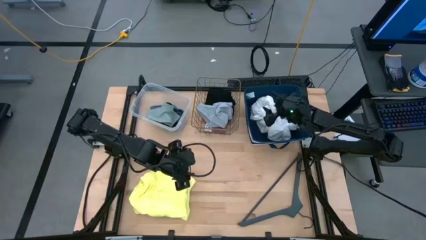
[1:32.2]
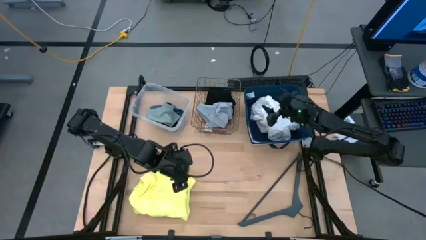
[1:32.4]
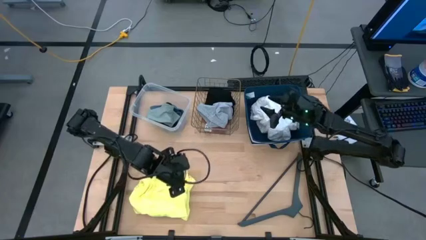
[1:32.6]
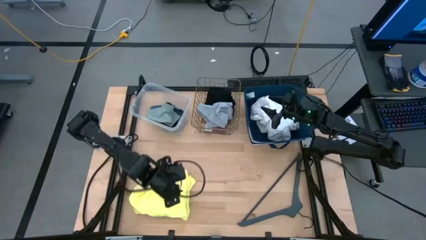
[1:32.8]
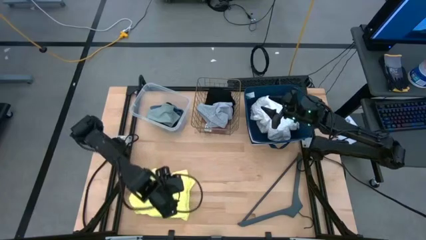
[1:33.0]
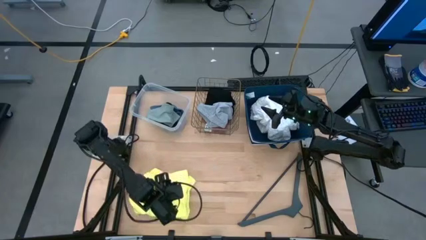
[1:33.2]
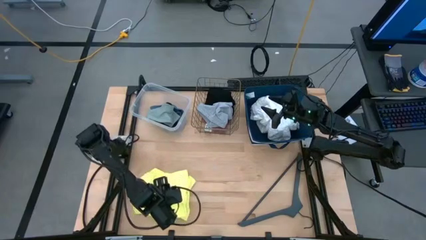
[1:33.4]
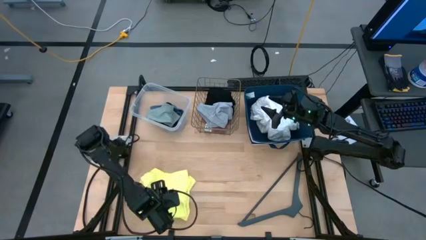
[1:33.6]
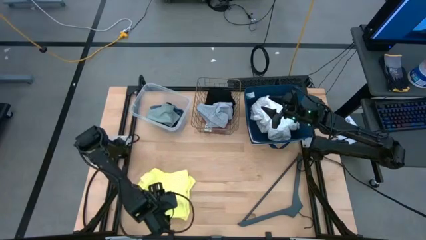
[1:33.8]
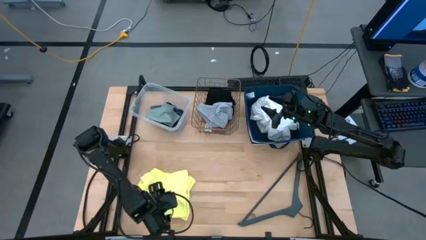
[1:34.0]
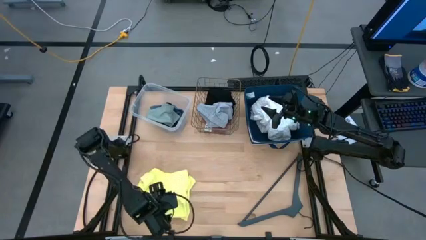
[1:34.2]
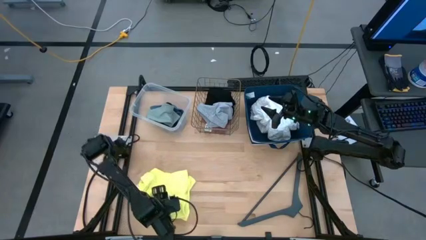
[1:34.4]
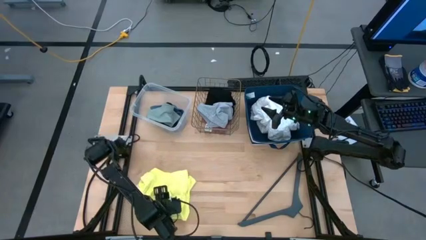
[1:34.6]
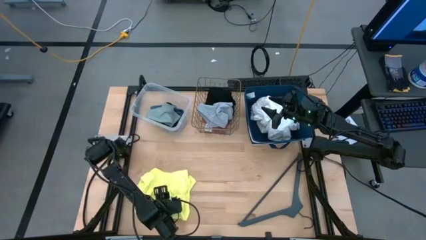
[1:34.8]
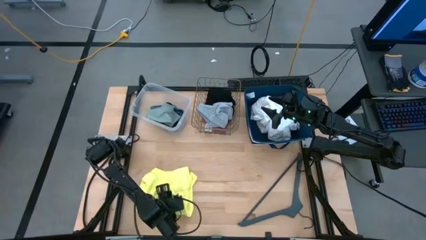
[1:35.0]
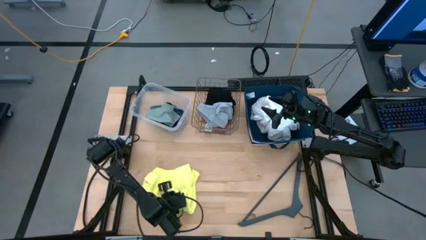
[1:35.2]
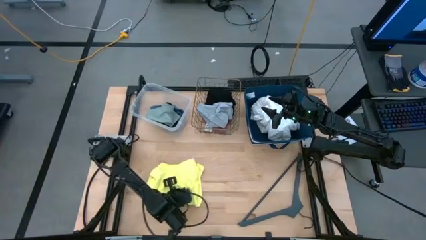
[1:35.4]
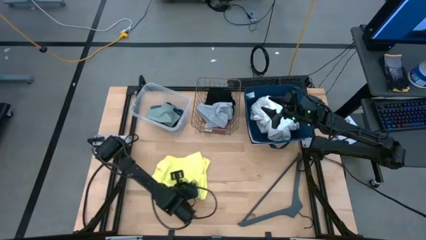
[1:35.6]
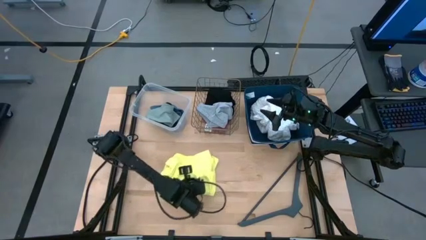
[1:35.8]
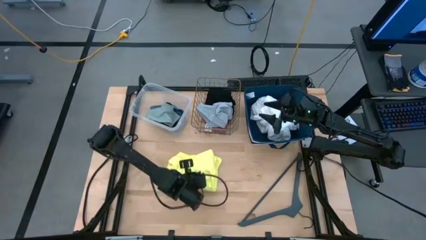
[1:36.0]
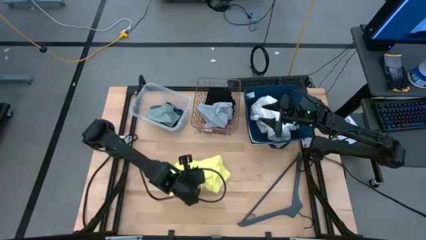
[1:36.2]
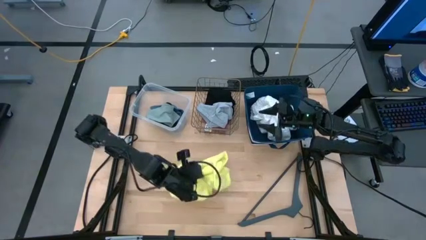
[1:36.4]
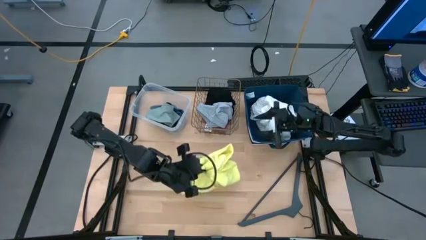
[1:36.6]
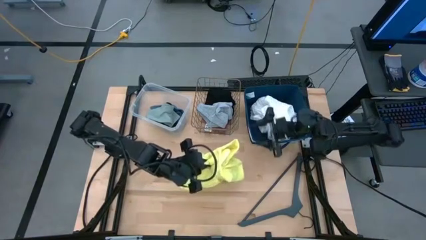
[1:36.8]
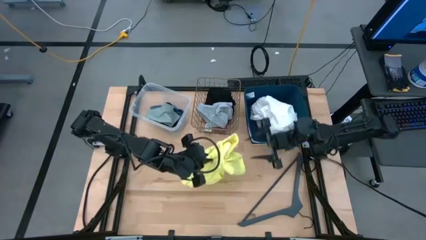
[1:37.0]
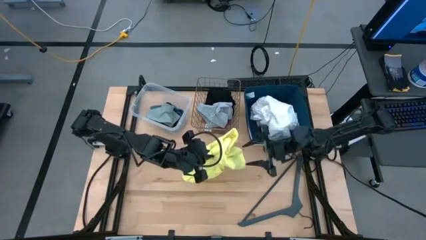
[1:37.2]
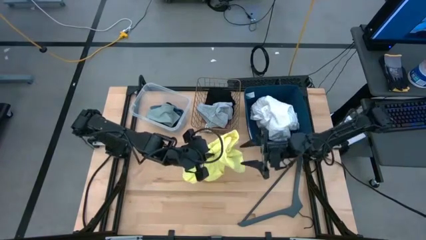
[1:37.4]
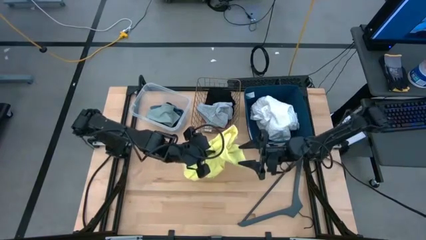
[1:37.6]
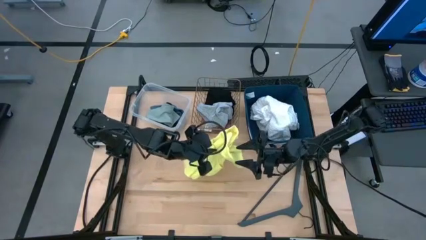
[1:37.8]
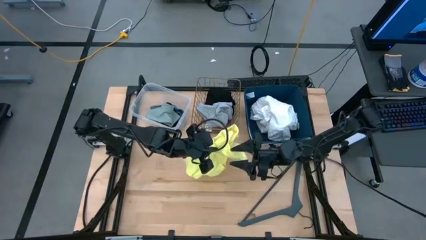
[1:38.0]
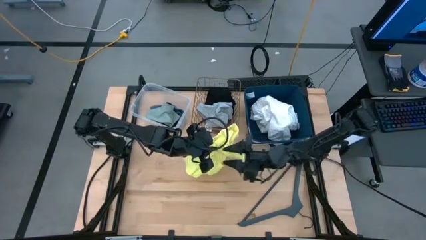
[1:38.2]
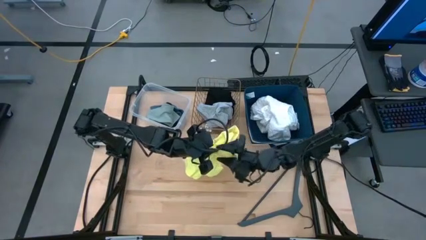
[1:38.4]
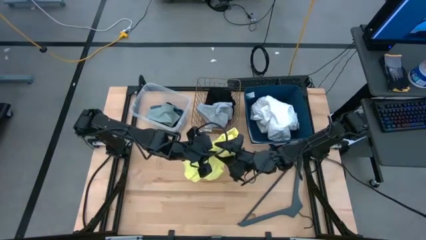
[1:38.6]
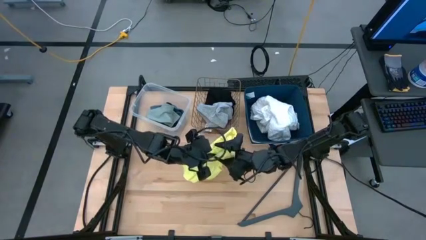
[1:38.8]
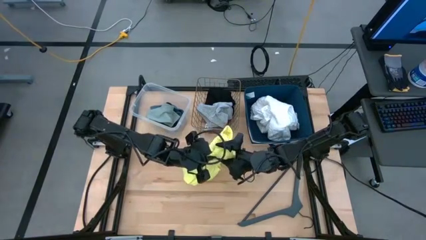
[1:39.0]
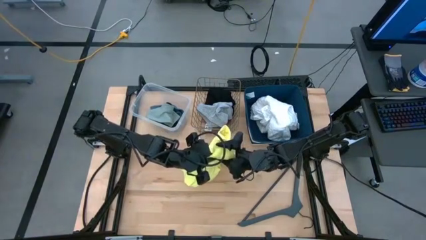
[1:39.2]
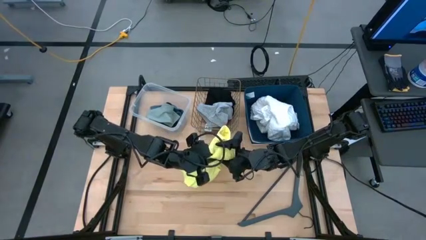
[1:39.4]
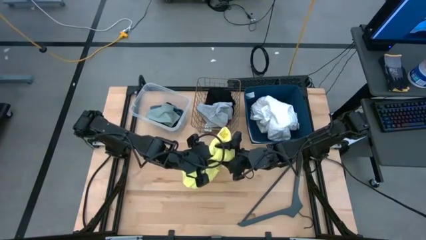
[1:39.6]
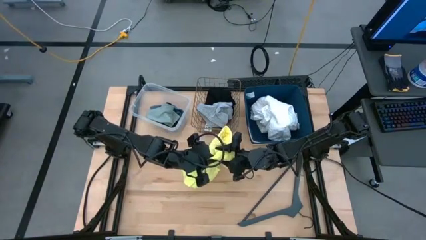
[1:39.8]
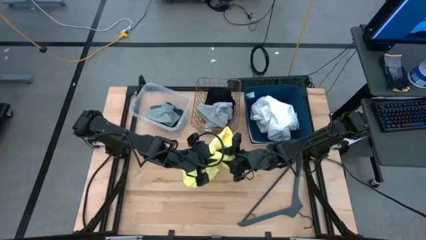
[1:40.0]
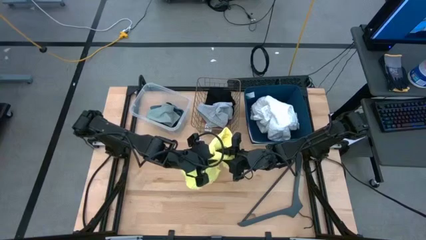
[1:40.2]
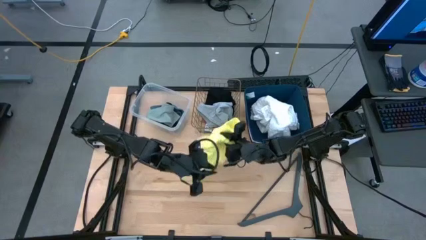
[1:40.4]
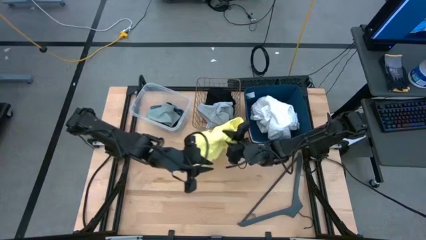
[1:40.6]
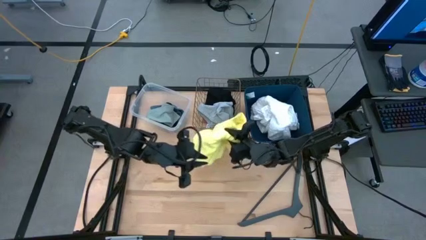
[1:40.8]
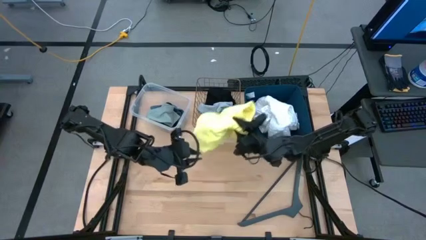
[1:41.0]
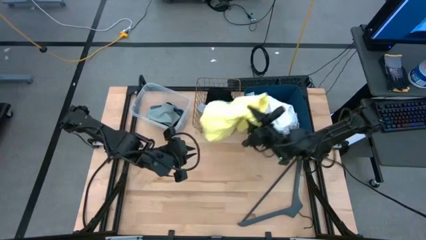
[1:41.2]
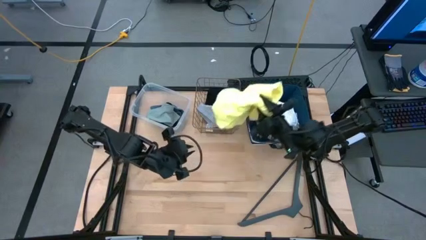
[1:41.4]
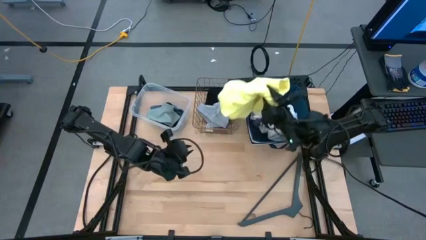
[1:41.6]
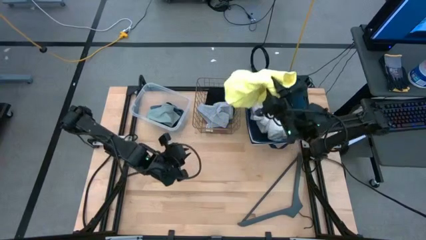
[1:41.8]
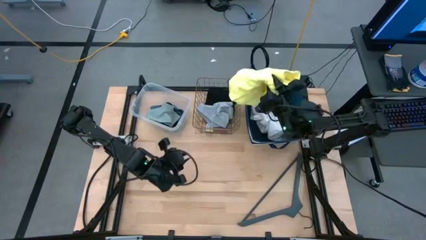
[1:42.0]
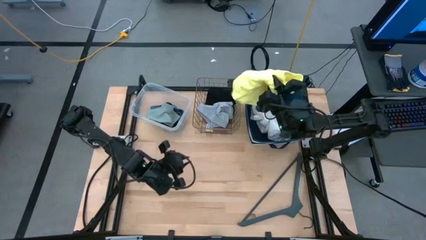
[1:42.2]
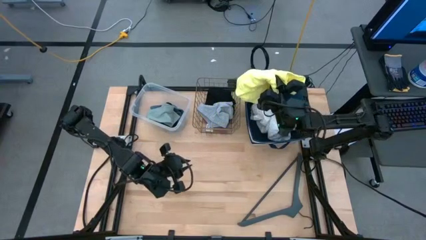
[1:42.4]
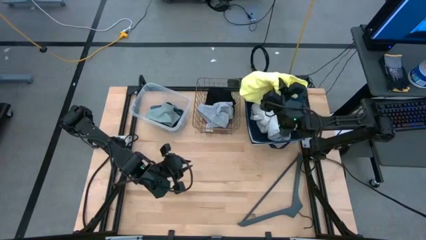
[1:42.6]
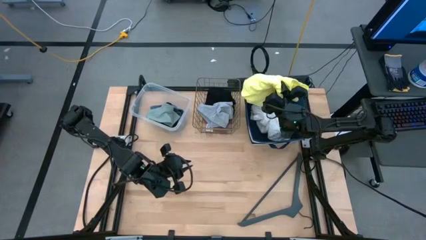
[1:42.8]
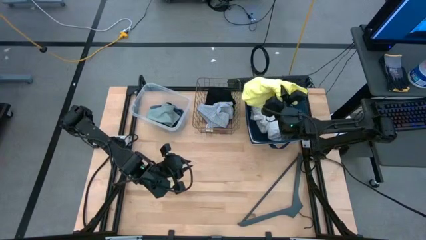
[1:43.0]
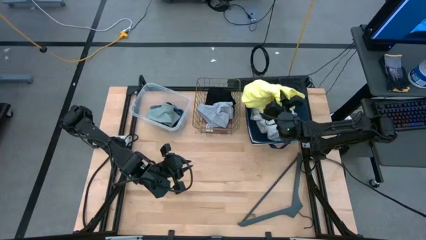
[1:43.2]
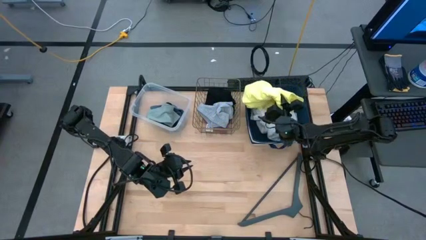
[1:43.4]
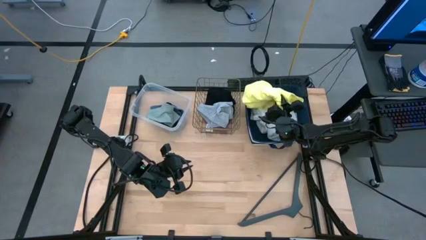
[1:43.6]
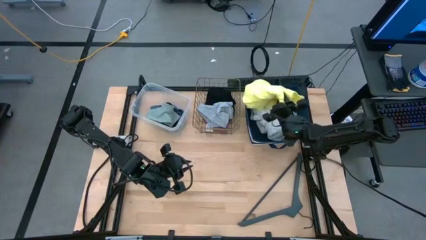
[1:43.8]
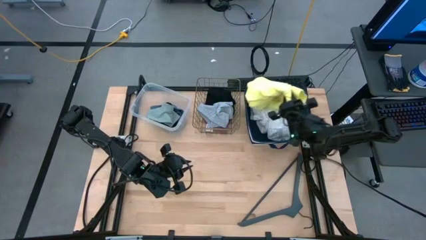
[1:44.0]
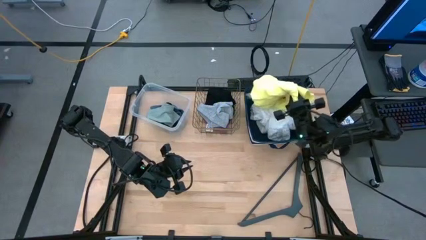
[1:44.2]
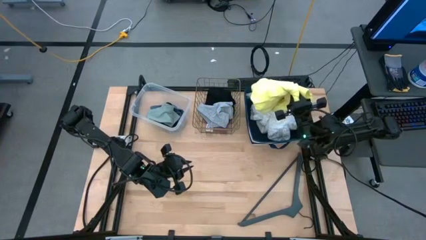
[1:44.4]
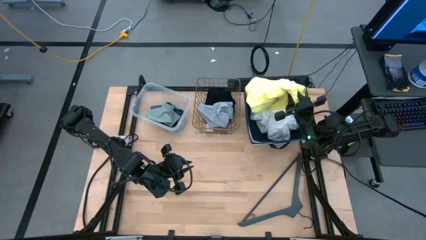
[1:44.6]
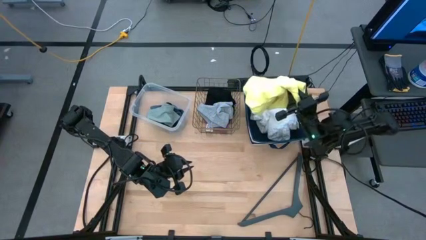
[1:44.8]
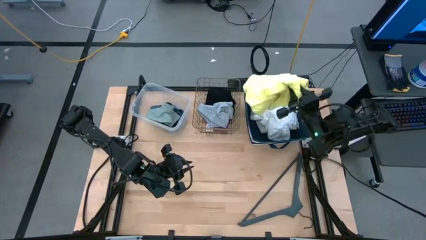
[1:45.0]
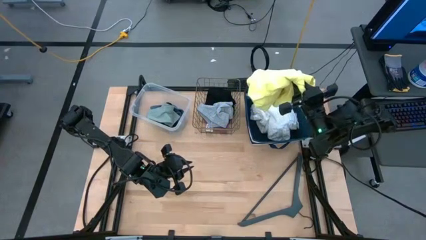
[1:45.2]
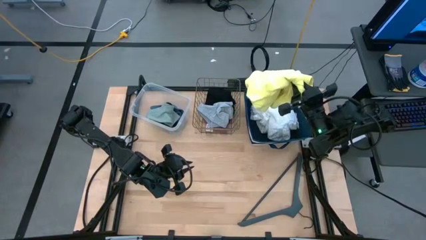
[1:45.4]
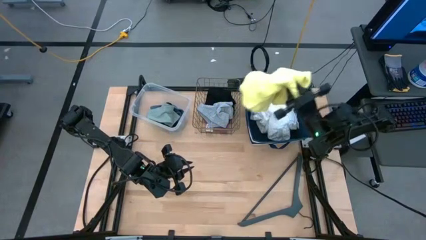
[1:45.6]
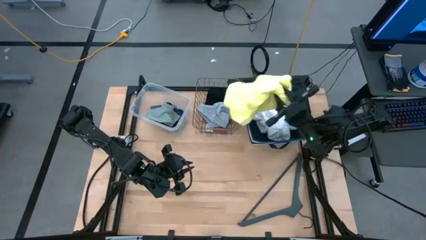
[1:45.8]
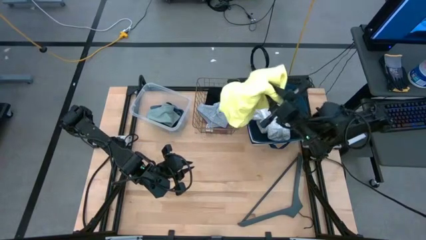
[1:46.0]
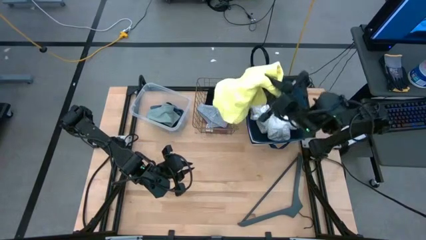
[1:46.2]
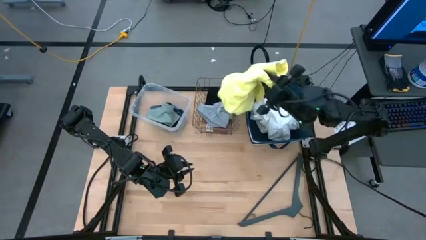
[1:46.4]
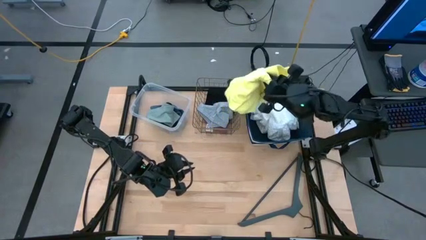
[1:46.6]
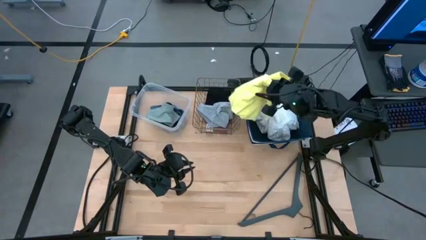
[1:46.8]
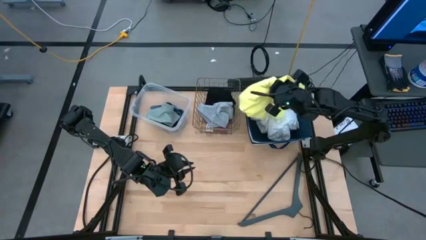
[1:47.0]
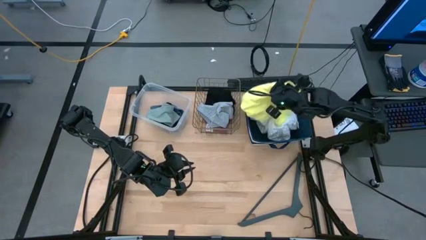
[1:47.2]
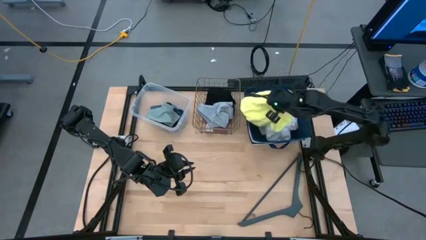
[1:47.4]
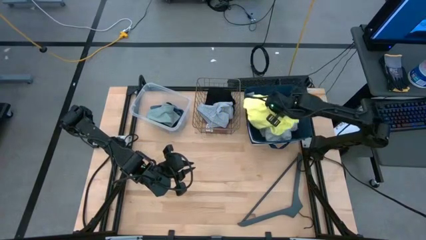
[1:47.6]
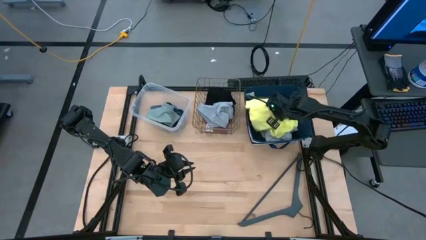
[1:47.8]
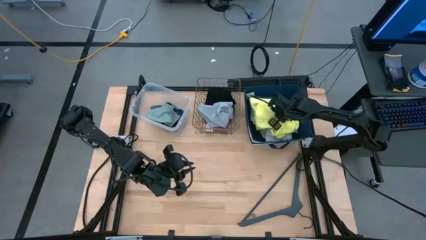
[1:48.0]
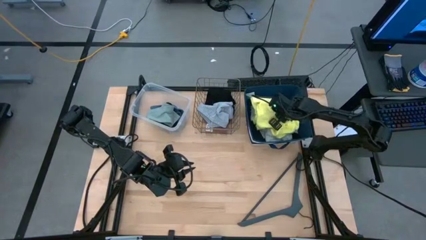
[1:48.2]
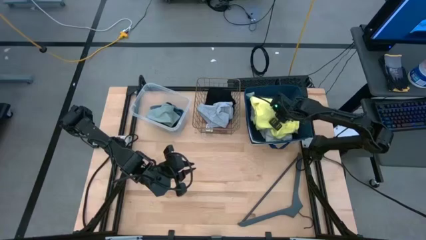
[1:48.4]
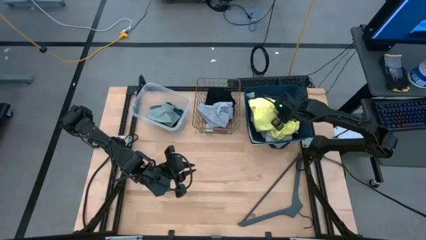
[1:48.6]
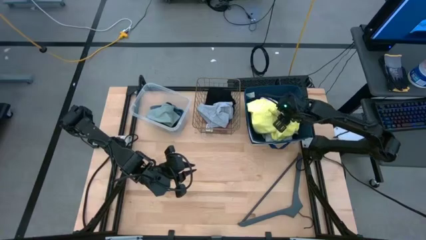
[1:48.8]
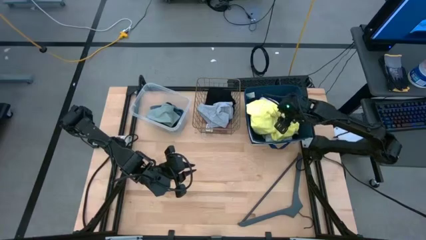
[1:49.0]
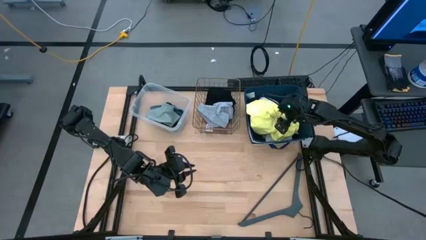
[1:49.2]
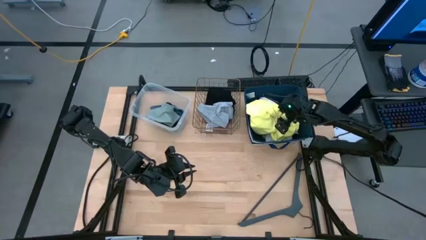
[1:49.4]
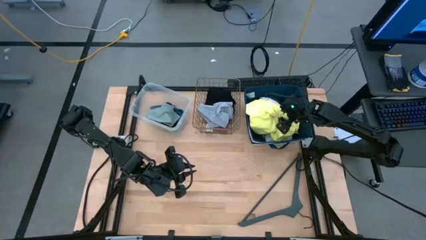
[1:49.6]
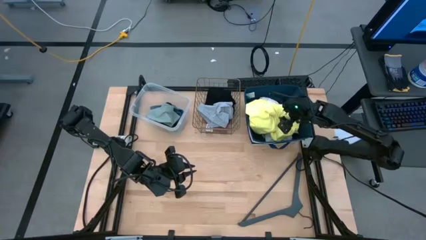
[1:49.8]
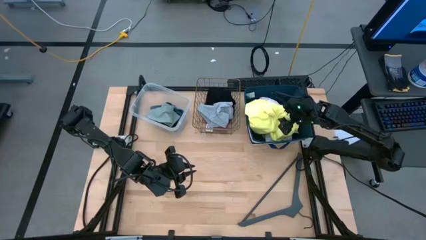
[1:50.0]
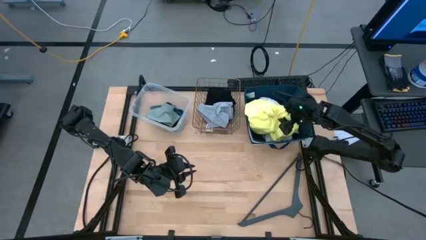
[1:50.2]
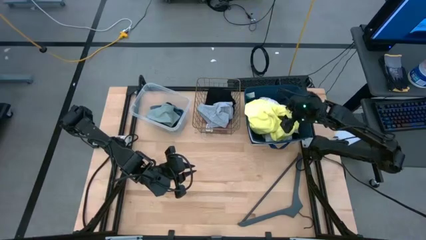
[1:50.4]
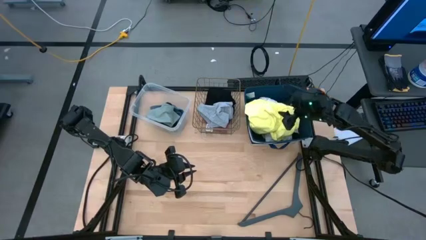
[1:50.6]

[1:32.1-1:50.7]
Task: Pick & Place Cloths
Put the yellow dress into the blue laundry organizer
